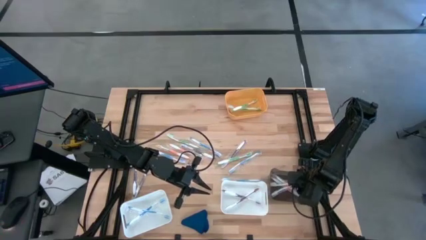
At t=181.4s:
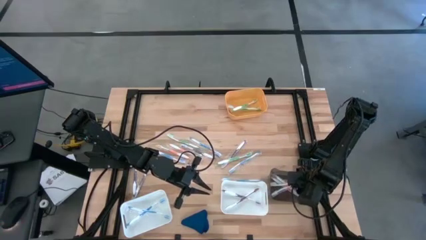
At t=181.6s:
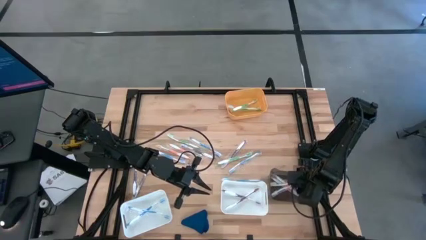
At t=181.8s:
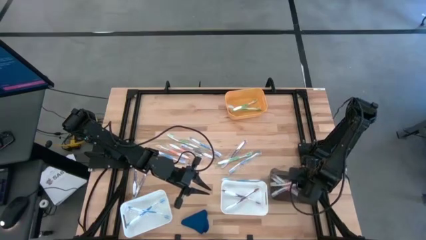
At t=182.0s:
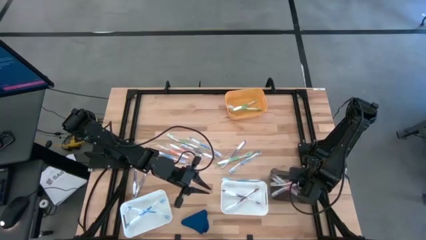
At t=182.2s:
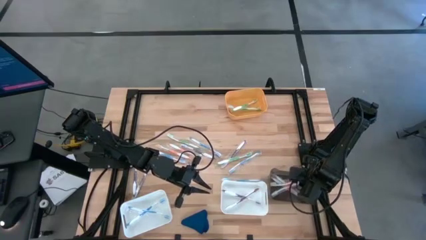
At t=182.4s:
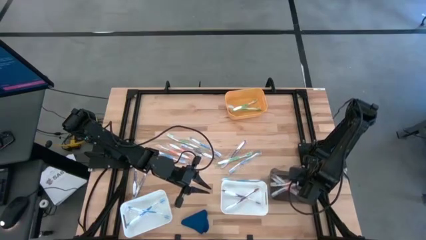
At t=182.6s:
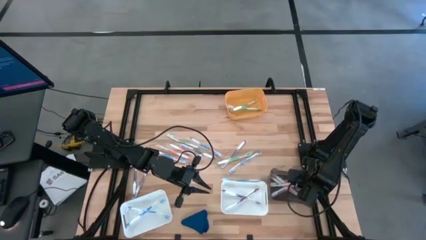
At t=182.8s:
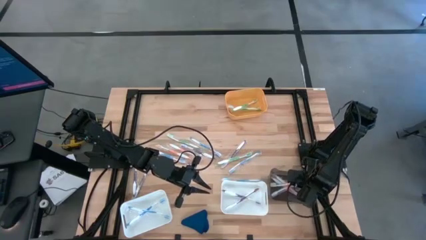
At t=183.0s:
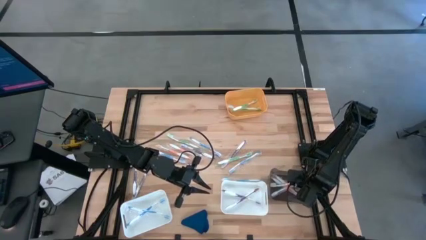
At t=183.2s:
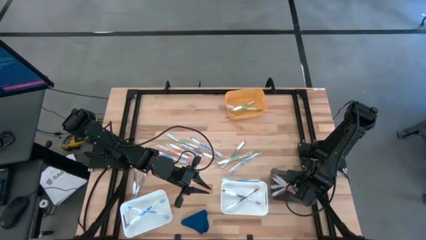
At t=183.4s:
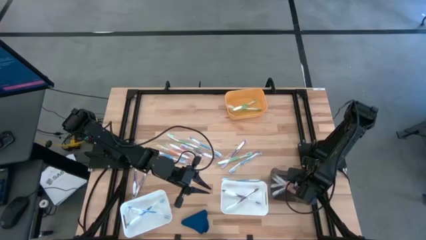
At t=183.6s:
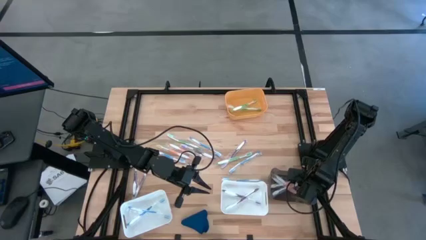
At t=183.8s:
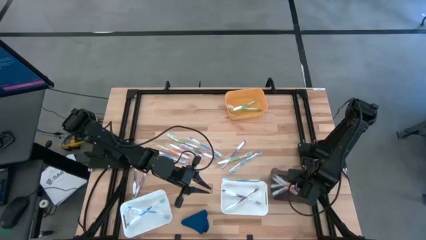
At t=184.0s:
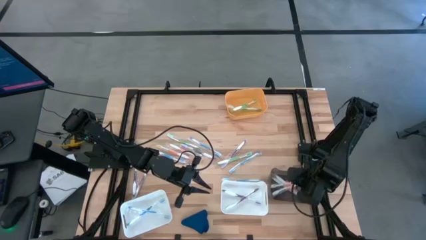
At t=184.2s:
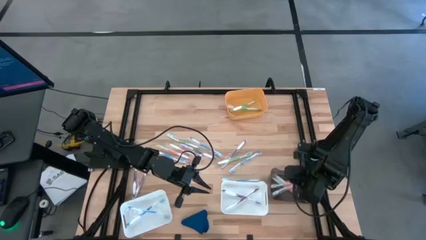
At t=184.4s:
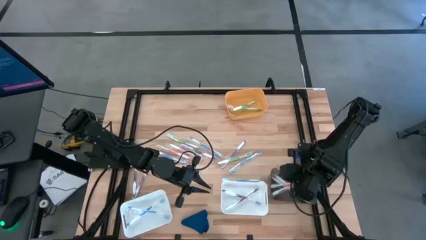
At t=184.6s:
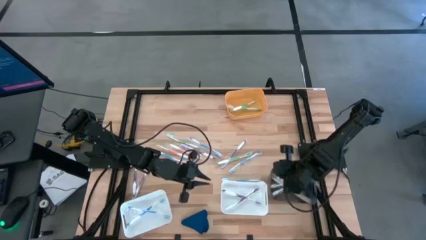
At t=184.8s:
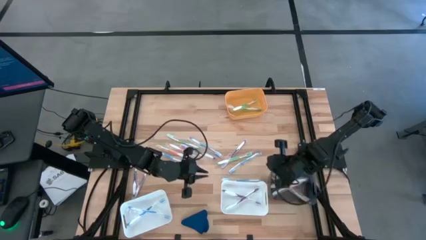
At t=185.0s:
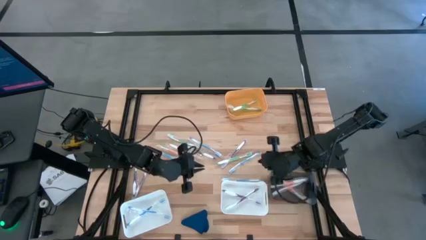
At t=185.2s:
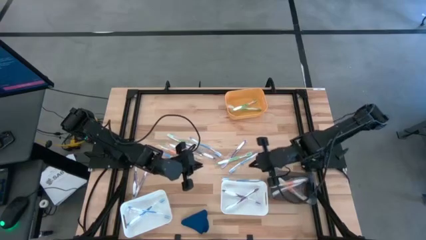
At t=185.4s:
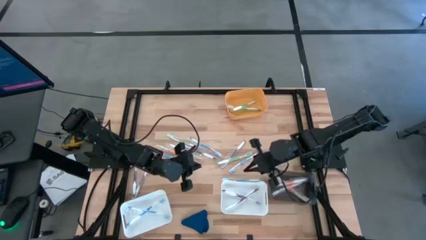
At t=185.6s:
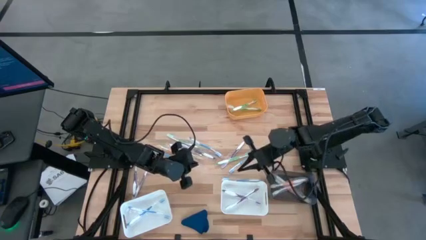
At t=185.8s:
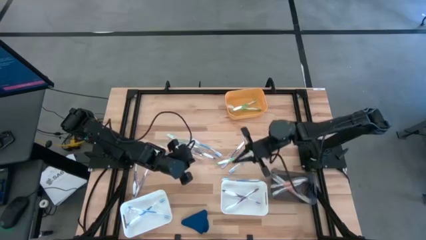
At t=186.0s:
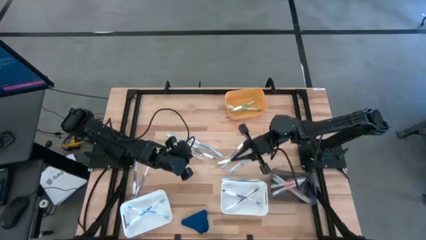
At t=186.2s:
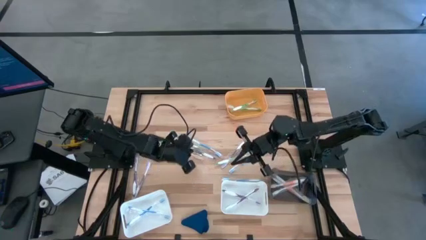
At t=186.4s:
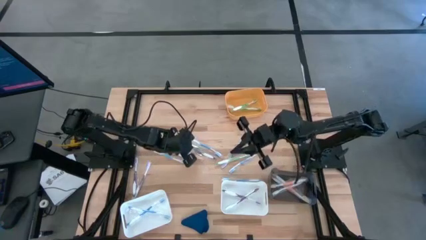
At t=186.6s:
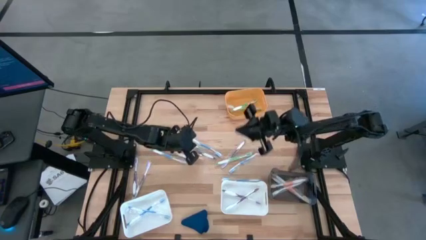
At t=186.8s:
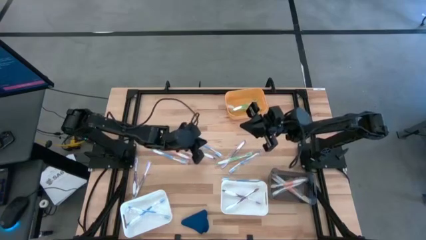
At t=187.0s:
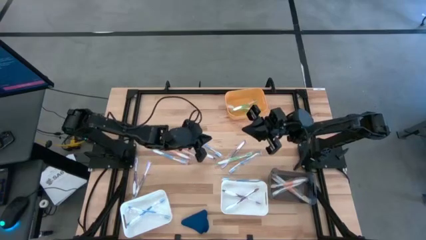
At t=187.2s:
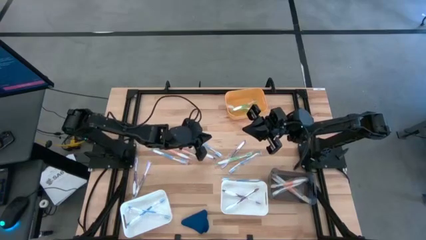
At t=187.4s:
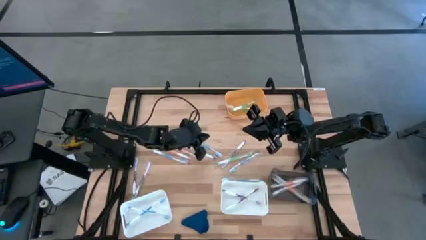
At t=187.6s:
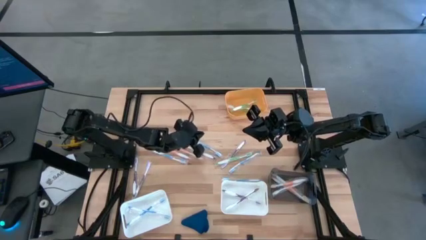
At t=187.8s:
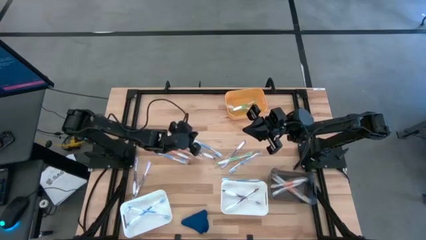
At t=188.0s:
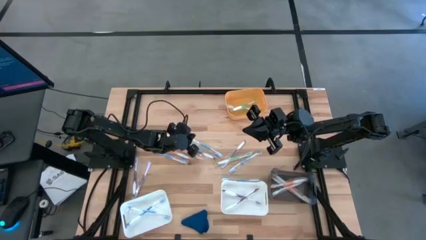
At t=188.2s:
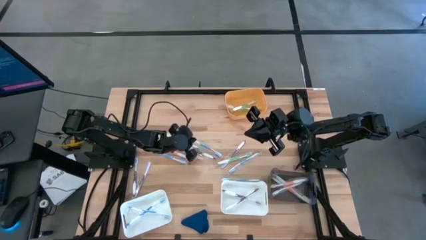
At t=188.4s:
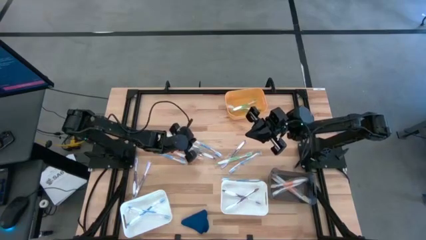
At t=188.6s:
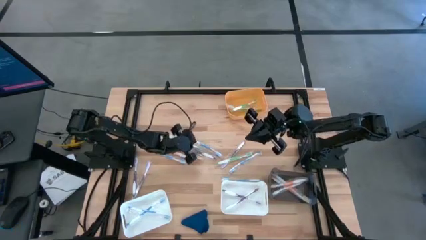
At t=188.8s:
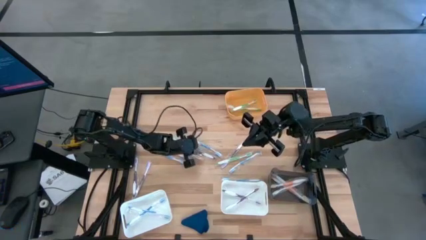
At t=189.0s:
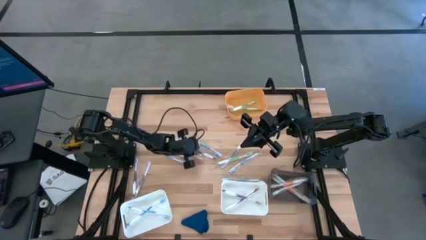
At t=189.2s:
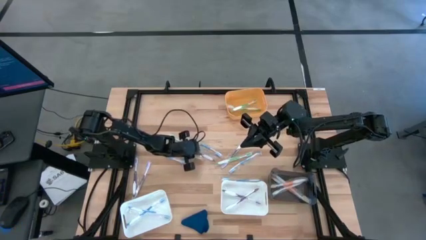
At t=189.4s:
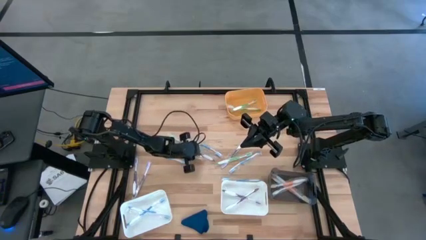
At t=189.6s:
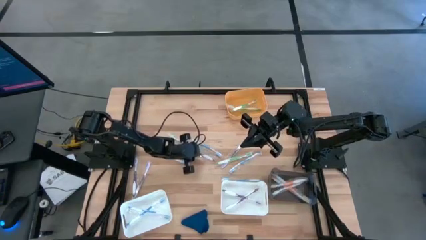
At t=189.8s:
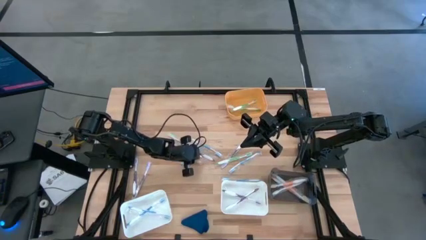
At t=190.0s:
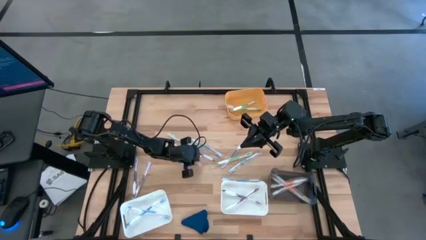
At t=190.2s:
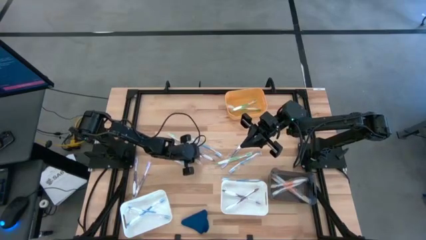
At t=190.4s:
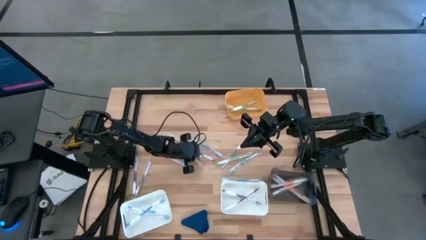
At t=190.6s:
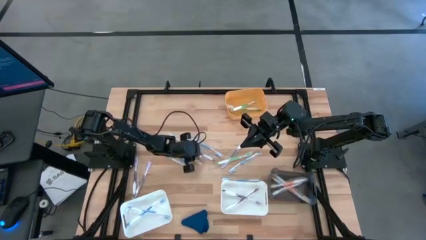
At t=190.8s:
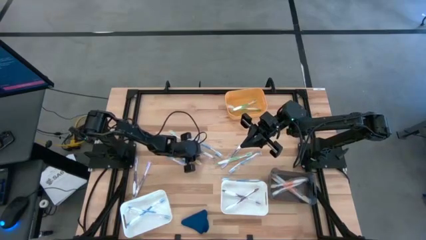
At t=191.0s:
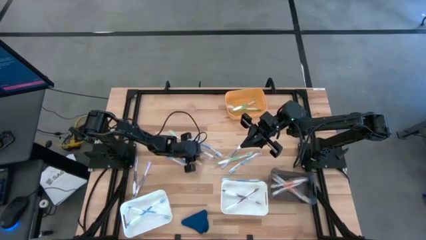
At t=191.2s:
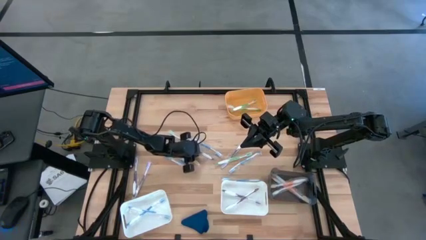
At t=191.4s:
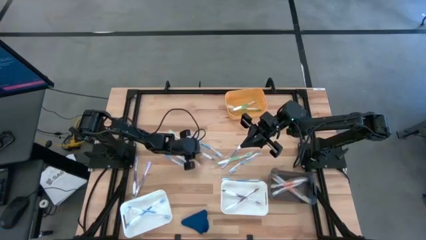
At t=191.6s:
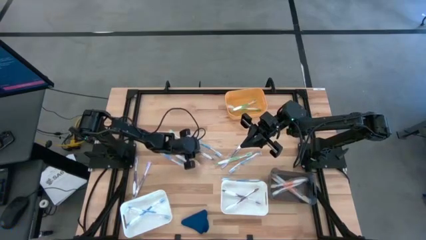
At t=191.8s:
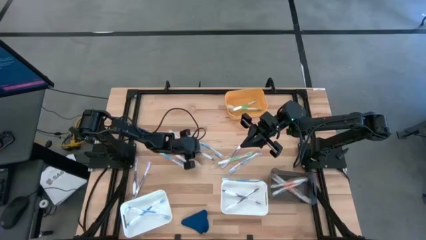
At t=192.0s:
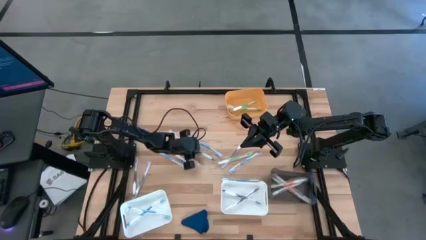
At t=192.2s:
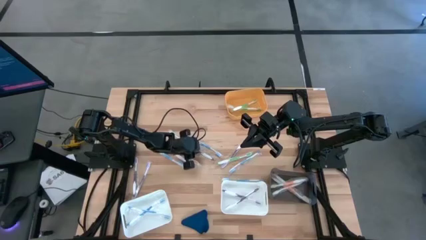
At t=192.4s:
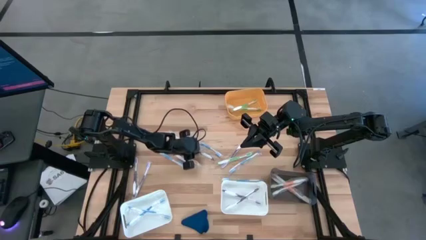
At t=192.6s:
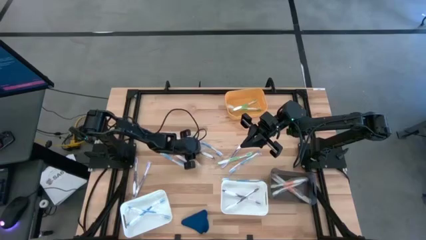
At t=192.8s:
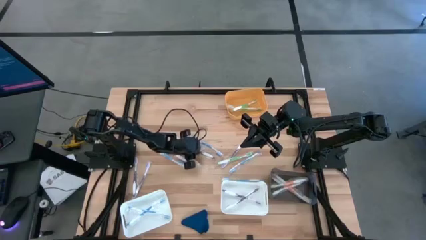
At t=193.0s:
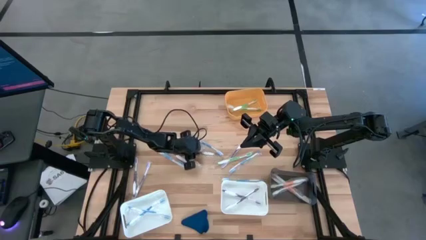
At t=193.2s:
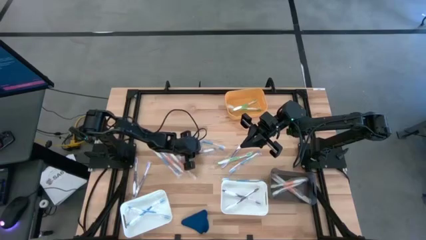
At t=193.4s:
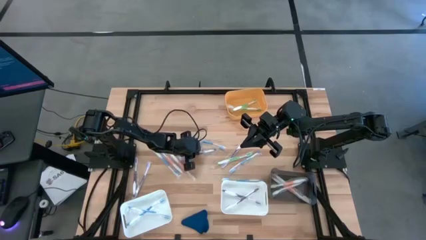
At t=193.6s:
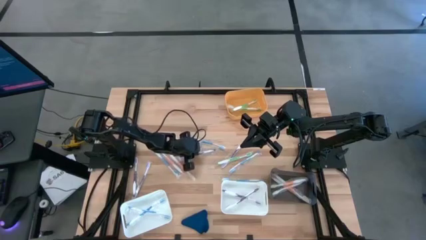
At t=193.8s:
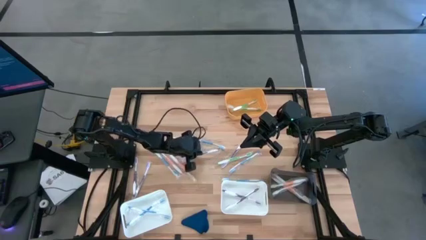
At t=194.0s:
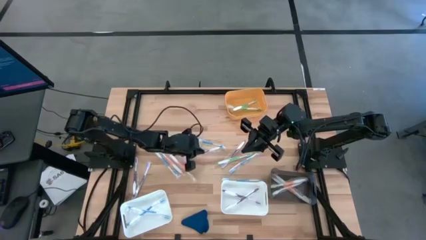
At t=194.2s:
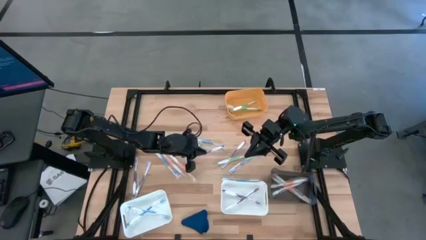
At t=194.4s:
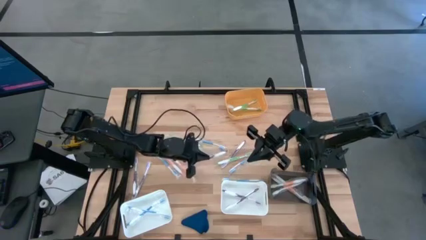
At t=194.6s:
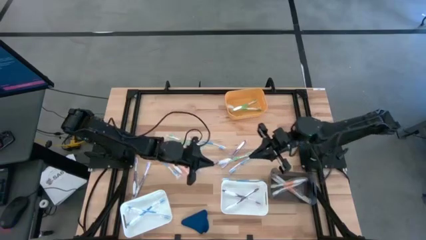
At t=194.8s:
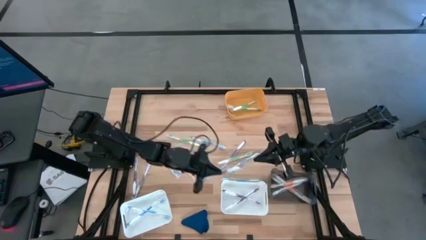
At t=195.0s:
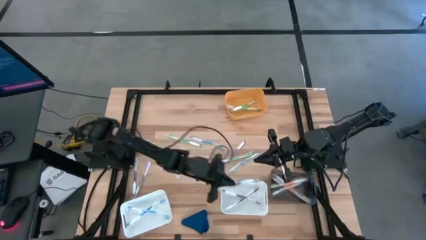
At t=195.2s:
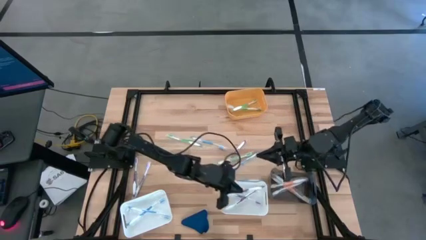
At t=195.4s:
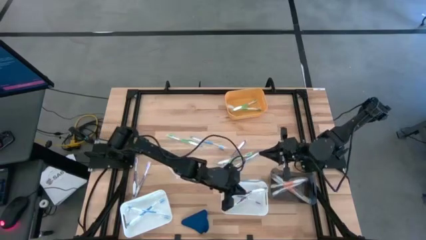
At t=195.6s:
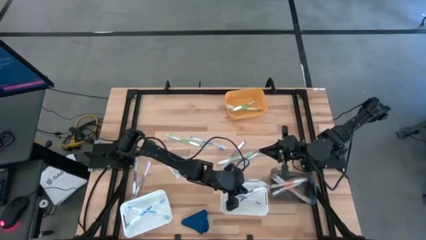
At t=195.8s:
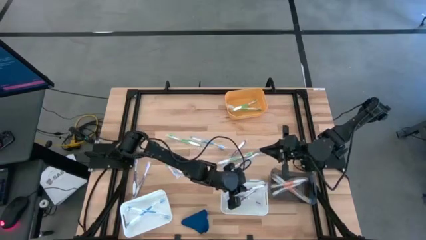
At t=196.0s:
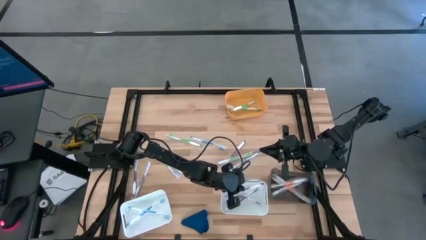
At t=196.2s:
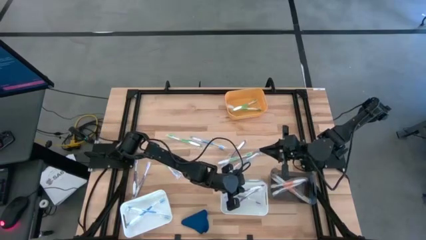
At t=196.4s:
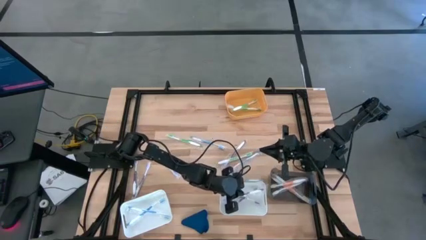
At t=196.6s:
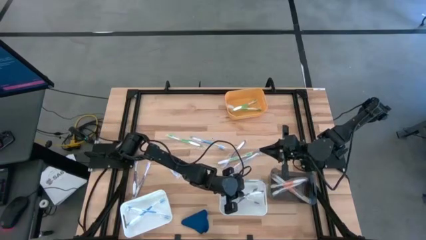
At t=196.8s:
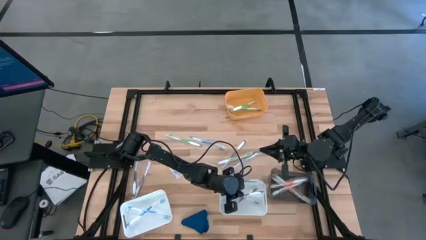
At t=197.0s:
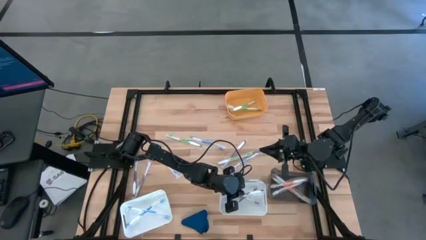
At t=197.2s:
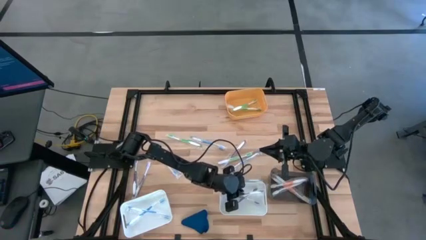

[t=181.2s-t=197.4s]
Task: Pick & Place Toothbrushes
Put the violet toothbrush into the right white bin

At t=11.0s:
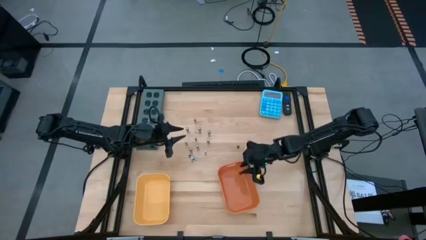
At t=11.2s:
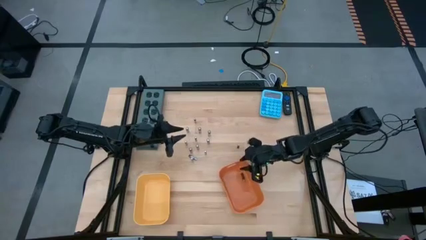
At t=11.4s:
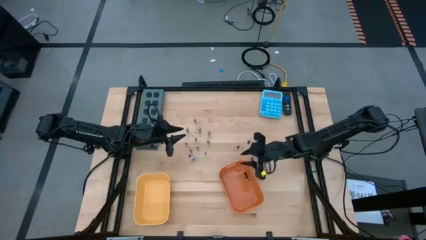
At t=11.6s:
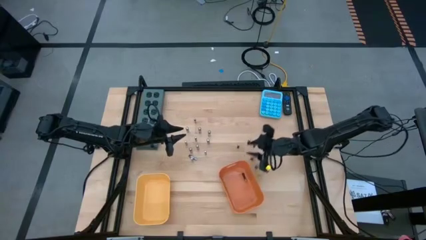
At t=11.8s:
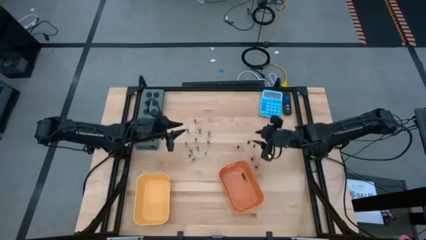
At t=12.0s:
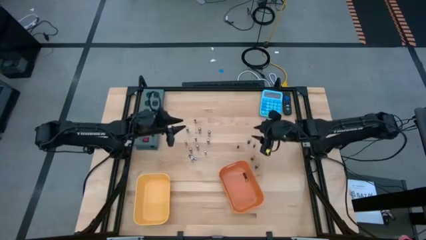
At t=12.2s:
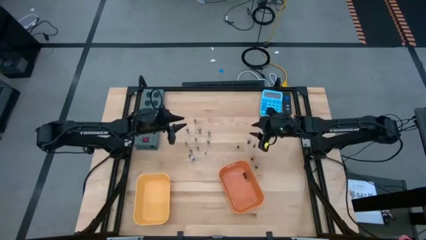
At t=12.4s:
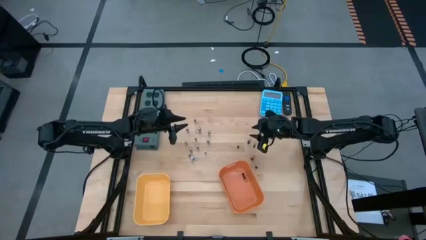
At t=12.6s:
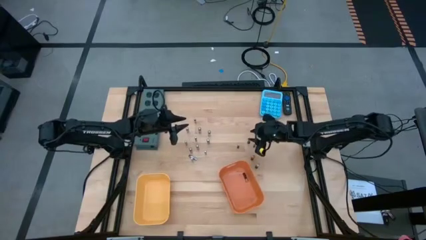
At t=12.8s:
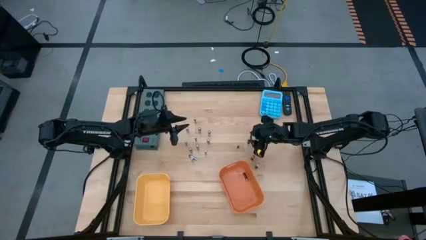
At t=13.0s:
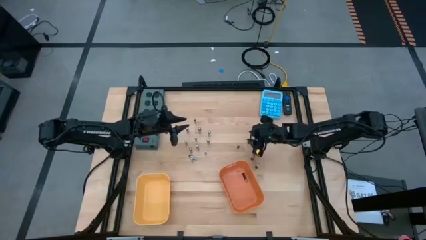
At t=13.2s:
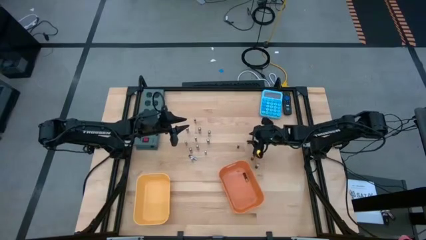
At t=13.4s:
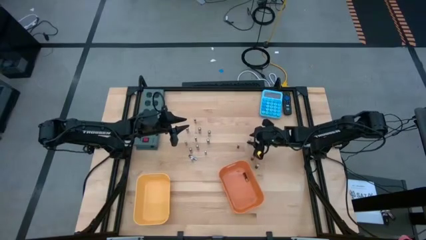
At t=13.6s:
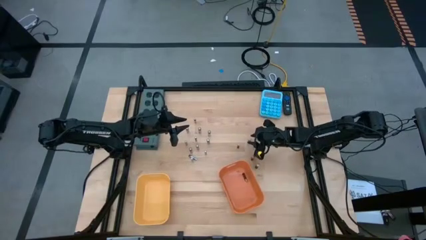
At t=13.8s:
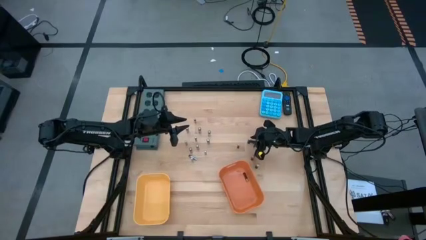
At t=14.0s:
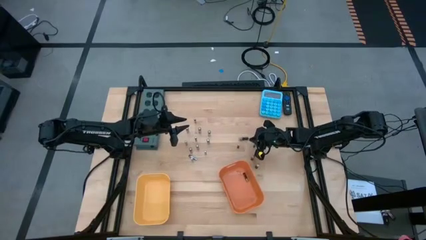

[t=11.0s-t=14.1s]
Task: Sort batteries
Put the brown battery into the orange bin
